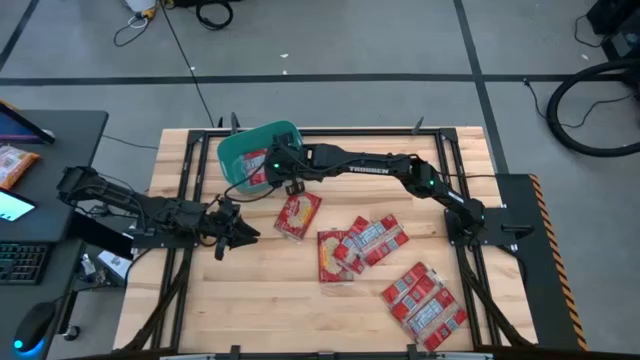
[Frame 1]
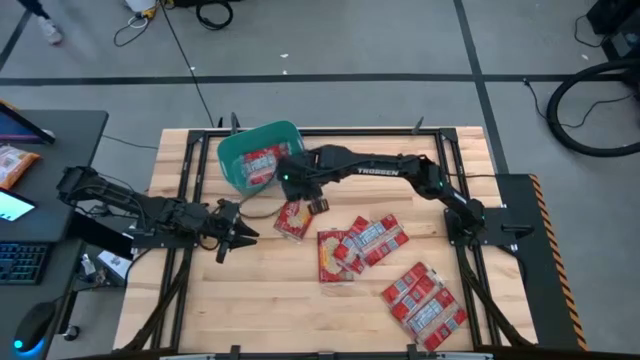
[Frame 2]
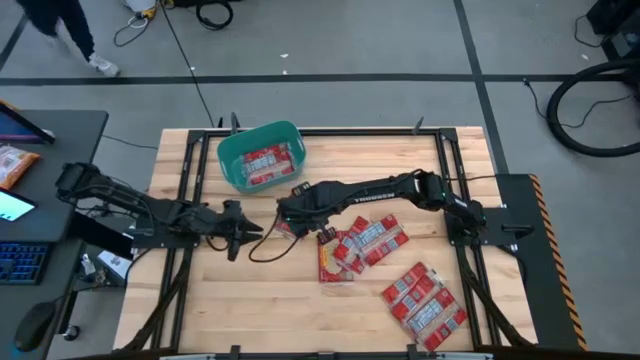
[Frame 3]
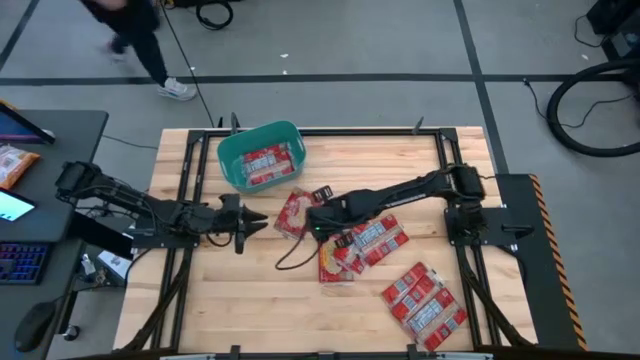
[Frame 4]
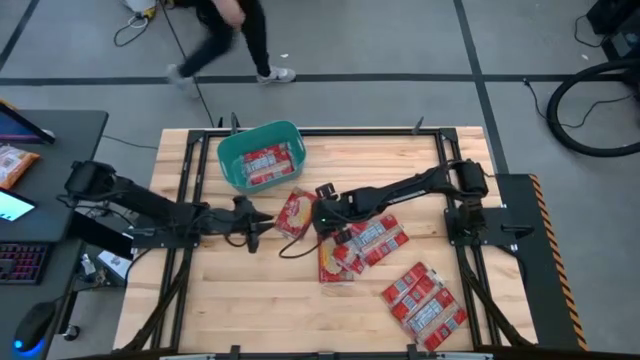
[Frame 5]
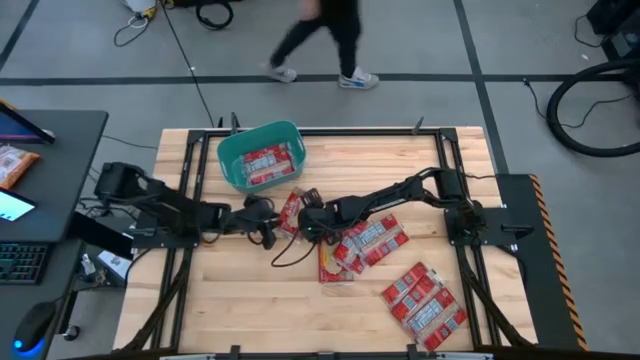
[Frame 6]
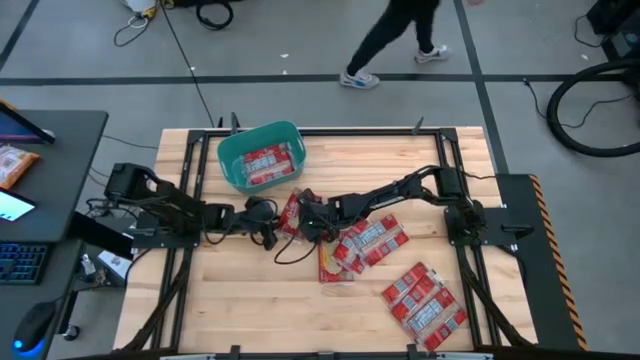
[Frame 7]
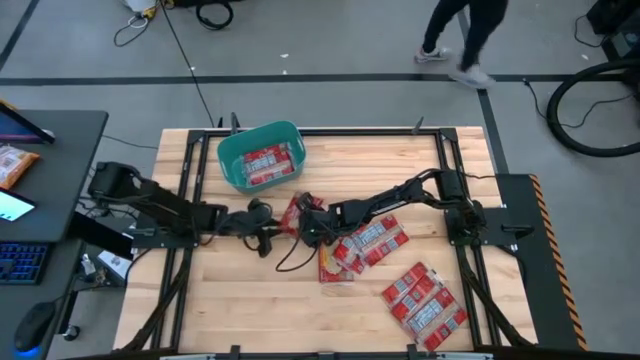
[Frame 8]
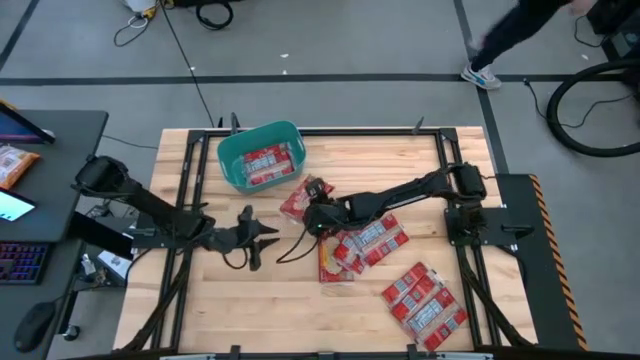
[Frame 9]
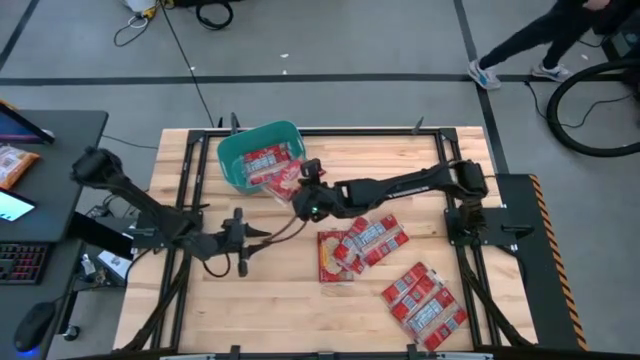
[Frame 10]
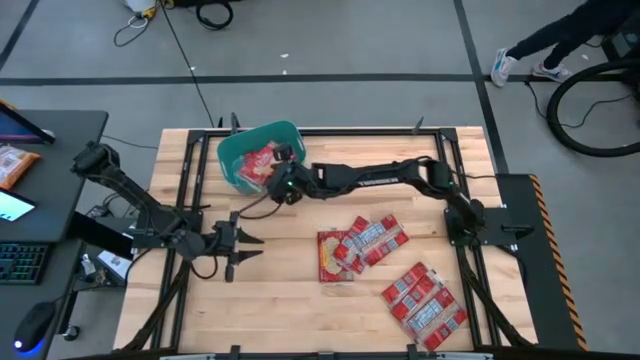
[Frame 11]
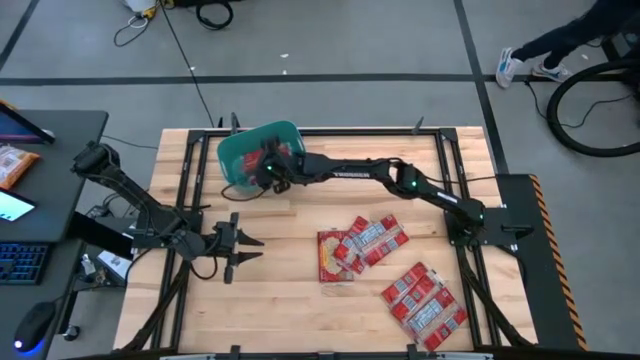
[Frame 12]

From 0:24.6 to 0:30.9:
Task: Sort popcorn bags into baskets
Put the popcorn bag into the green bin

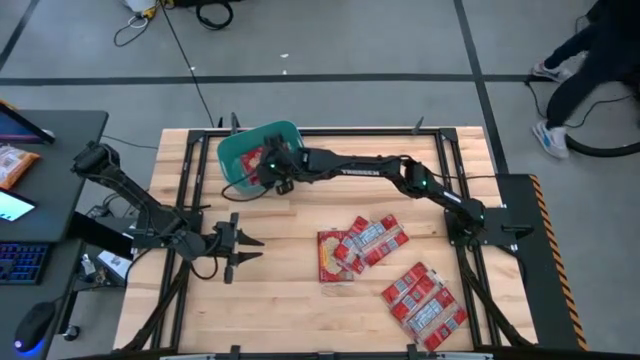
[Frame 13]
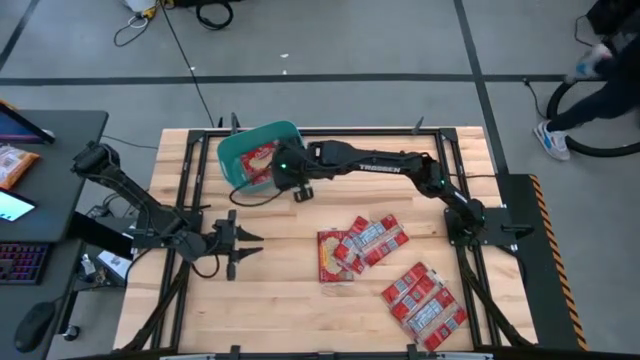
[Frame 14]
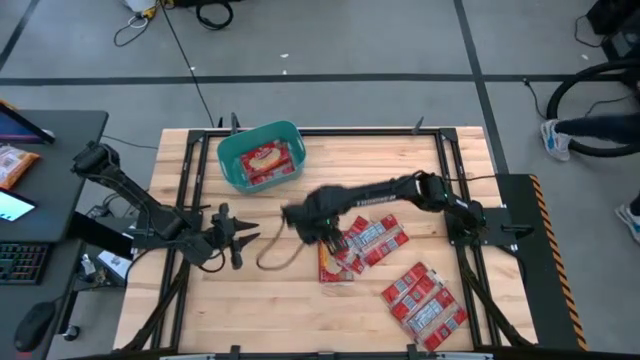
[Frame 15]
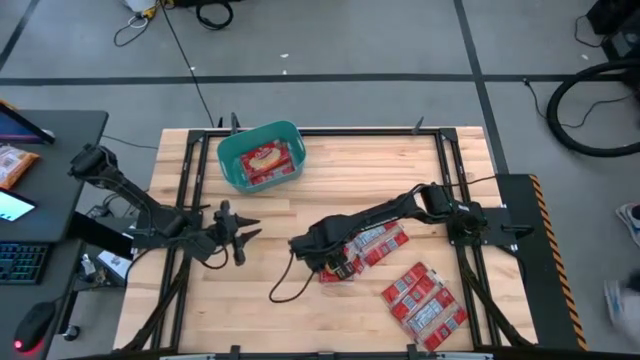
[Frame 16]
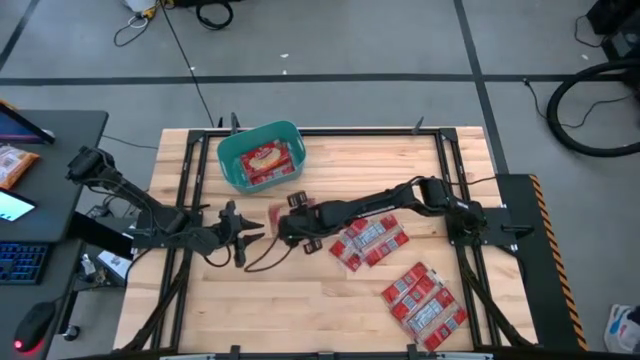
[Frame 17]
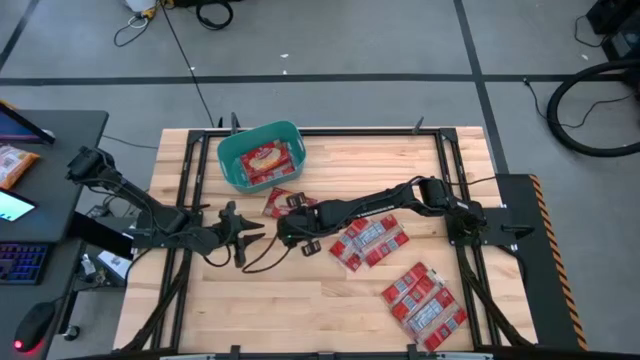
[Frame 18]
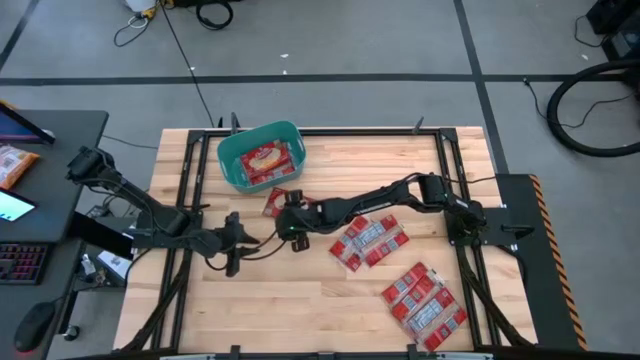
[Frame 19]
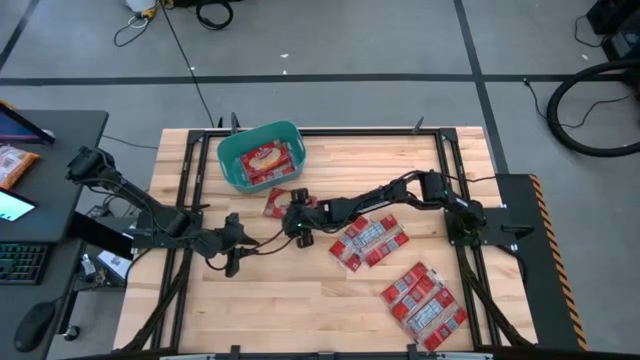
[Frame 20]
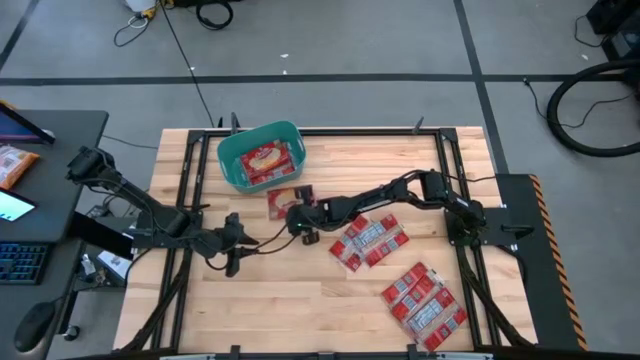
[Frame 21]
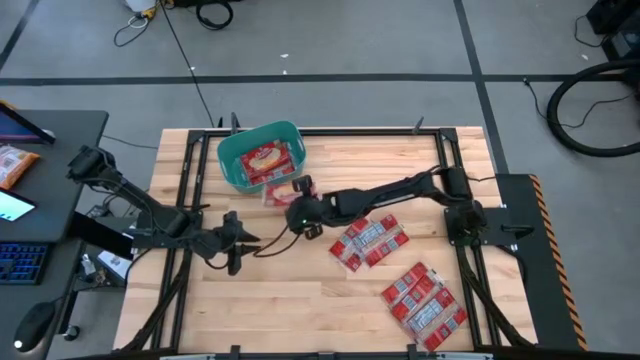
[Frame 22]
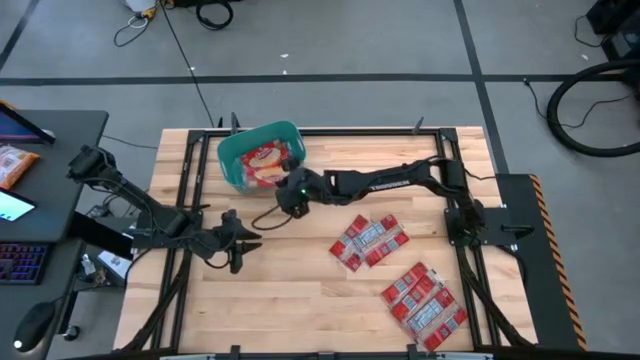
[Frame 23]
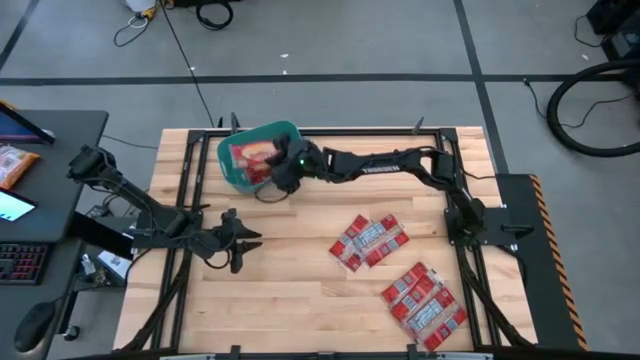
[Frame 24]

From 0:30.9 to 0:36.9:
Put the popcorn bag into the green bin

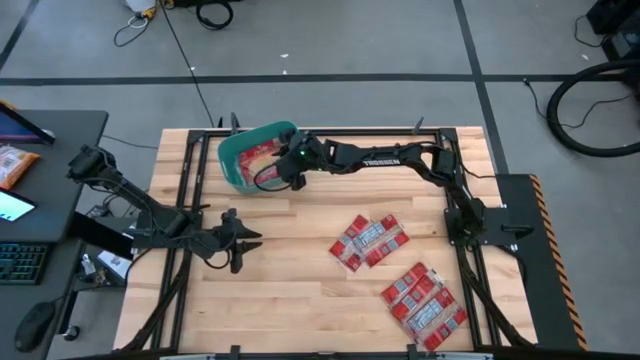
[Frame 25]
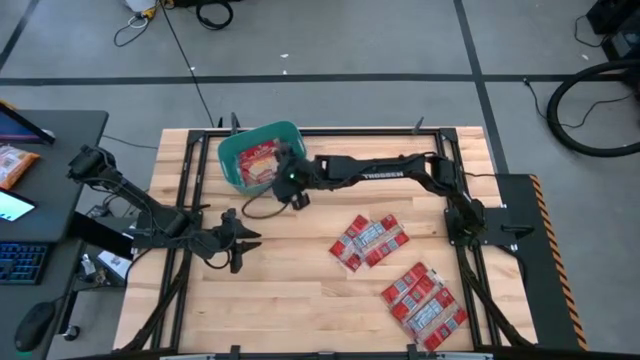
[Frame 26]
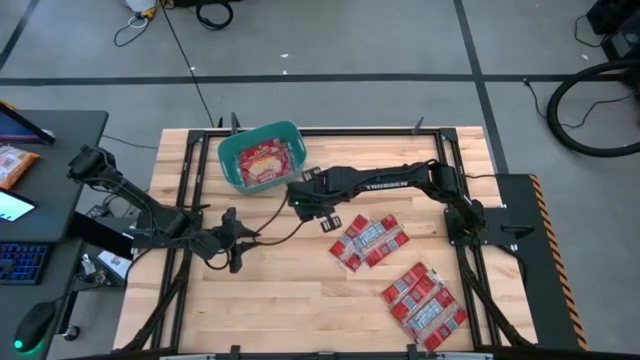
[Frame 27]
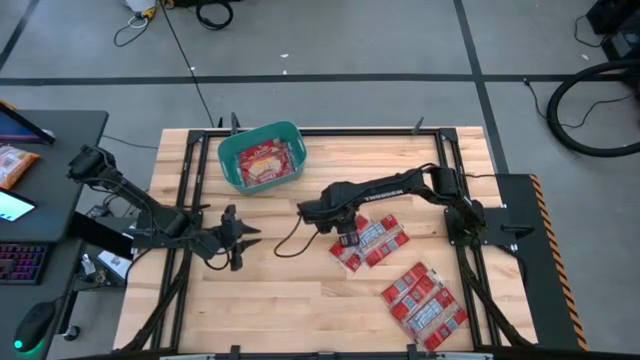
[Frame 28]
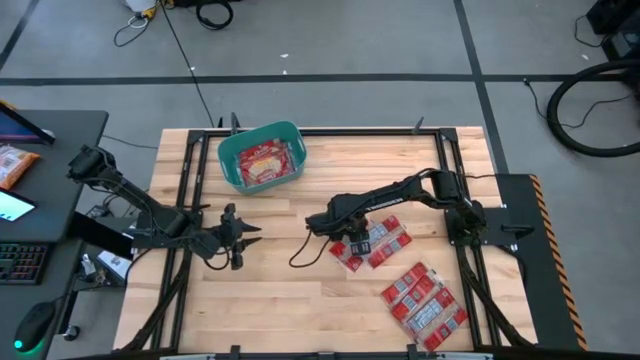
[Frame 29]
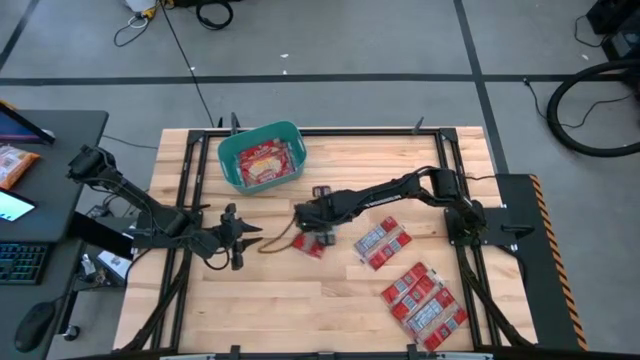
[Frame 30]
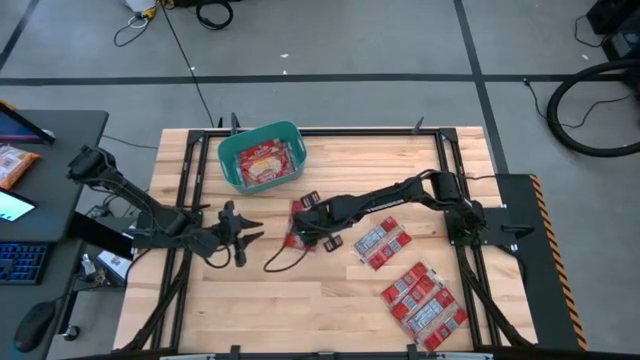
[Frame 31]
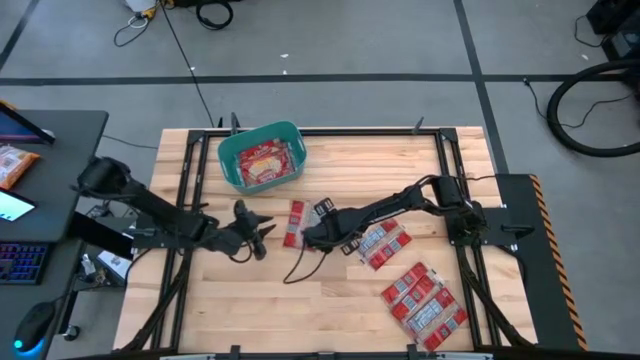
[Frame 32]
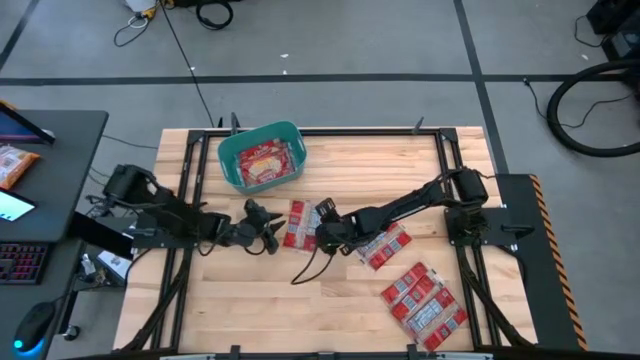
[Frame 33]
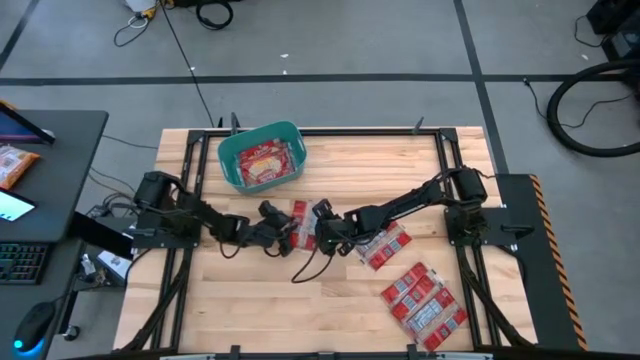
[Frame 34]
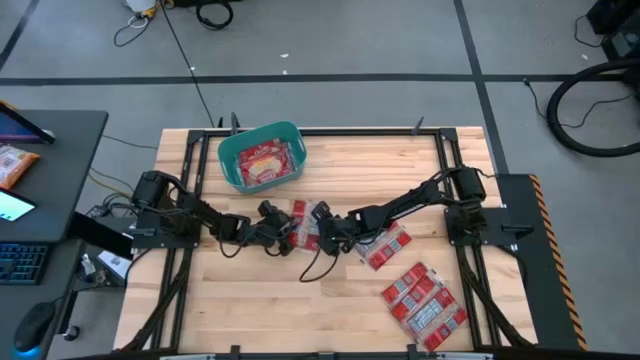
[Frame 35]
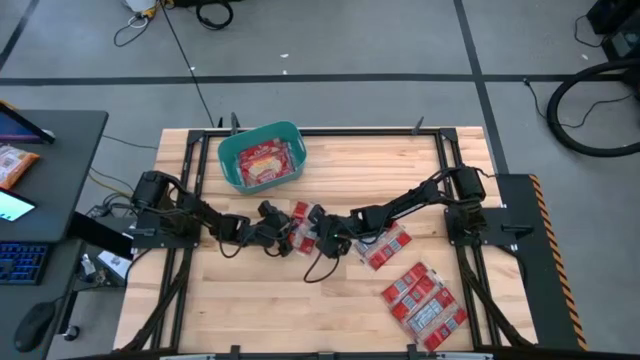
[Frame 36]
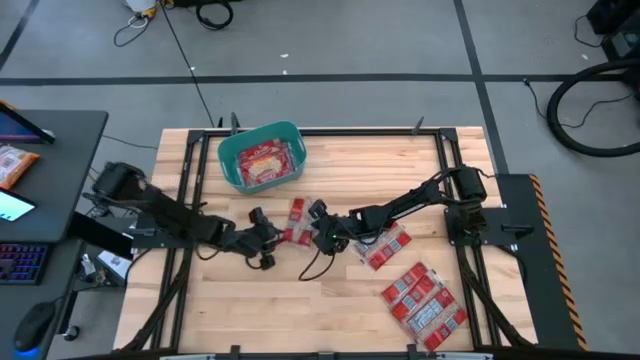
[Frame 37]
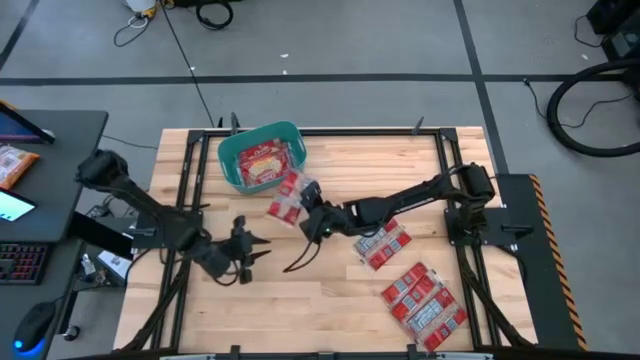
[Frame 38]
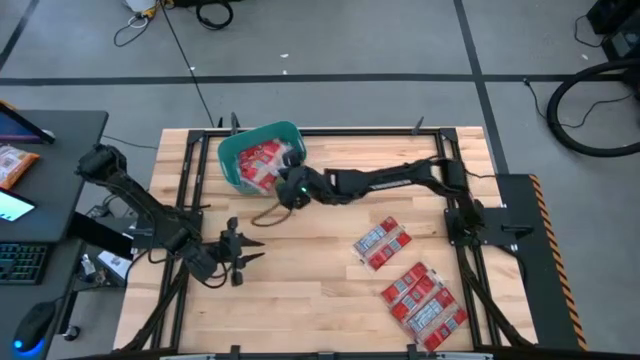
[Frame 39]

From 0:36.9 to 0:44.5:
Put the popcorn bag into the green bin
